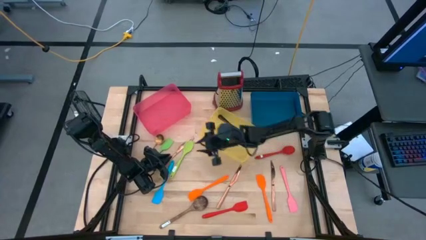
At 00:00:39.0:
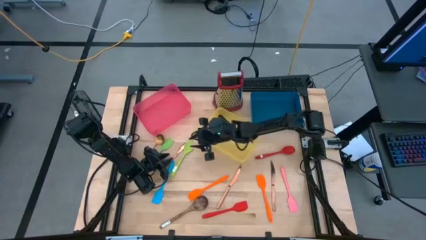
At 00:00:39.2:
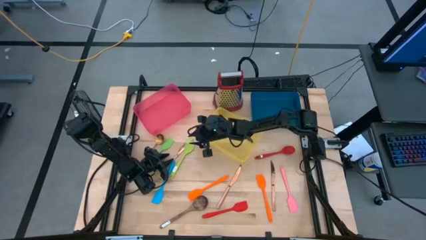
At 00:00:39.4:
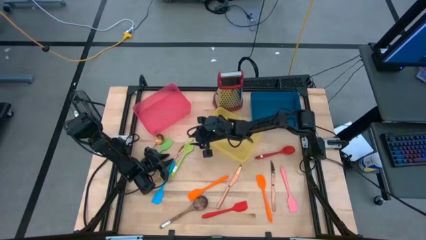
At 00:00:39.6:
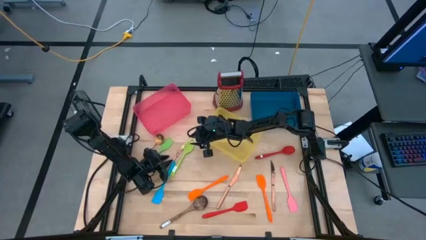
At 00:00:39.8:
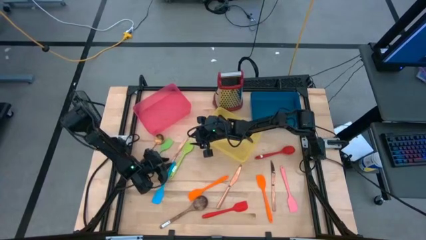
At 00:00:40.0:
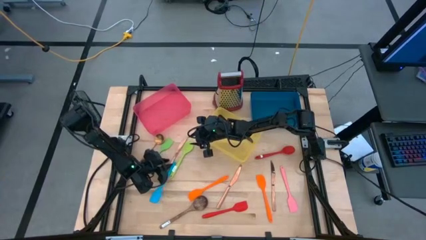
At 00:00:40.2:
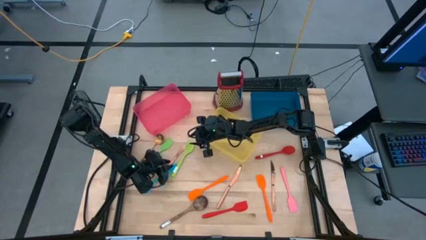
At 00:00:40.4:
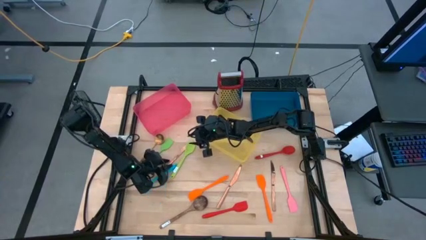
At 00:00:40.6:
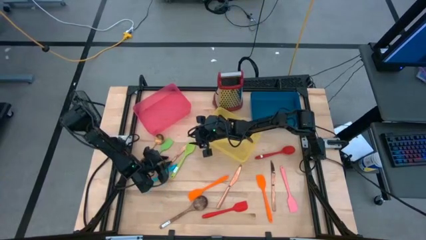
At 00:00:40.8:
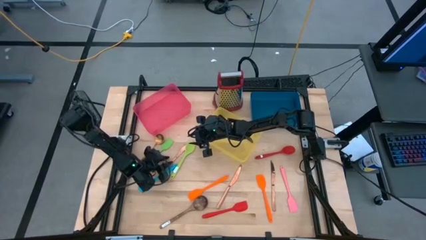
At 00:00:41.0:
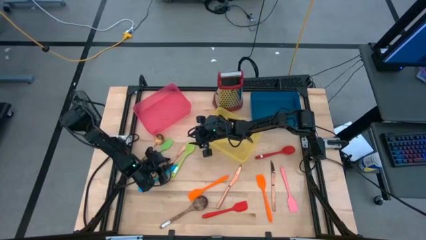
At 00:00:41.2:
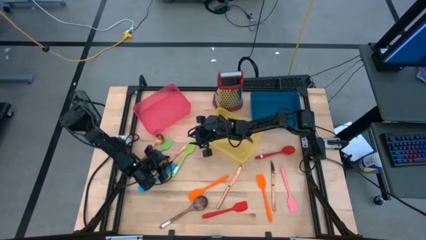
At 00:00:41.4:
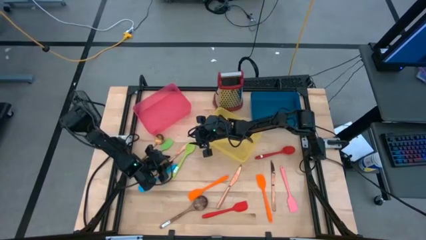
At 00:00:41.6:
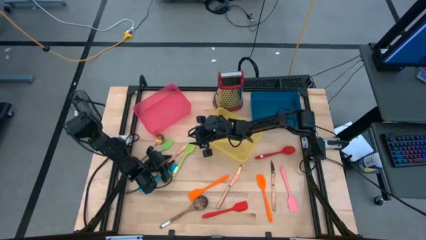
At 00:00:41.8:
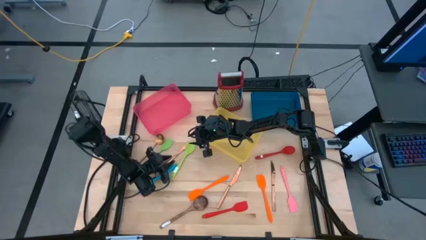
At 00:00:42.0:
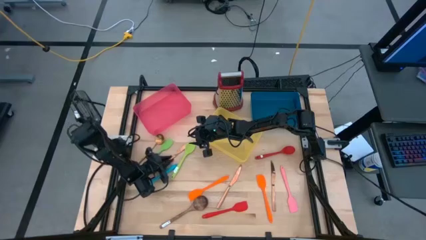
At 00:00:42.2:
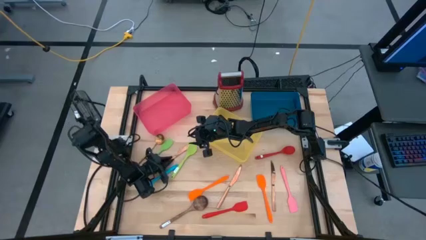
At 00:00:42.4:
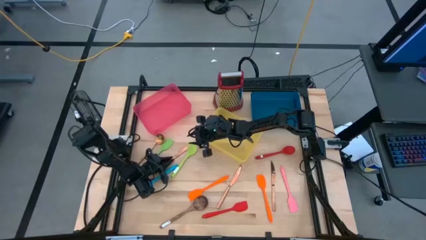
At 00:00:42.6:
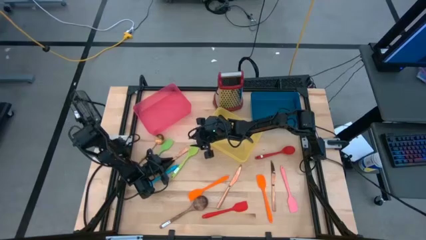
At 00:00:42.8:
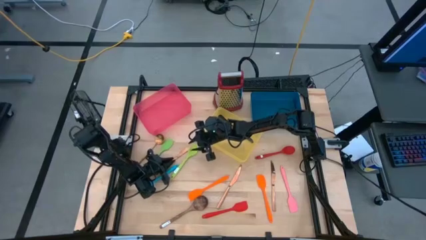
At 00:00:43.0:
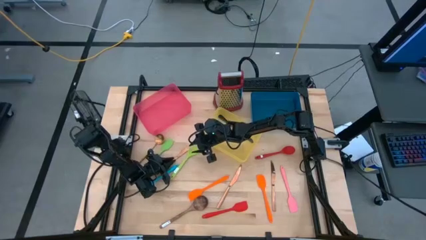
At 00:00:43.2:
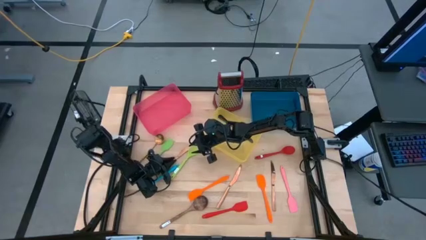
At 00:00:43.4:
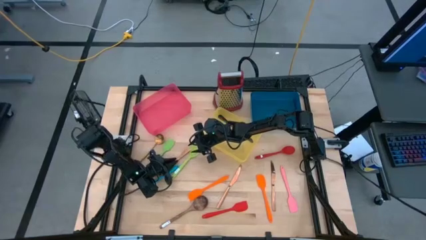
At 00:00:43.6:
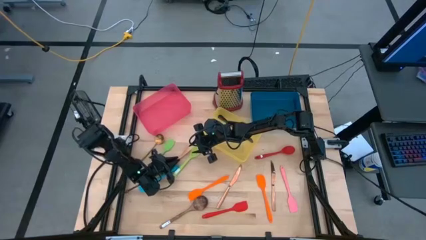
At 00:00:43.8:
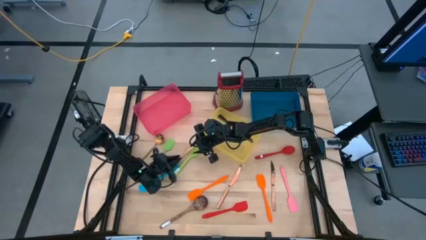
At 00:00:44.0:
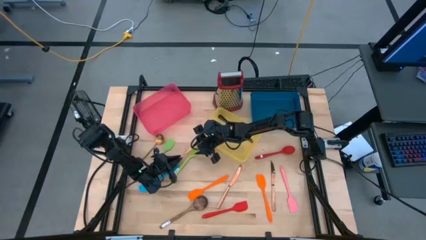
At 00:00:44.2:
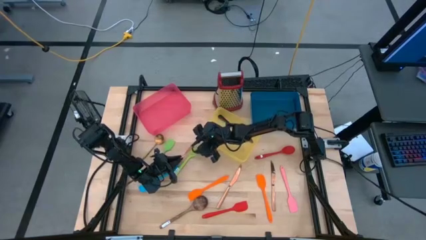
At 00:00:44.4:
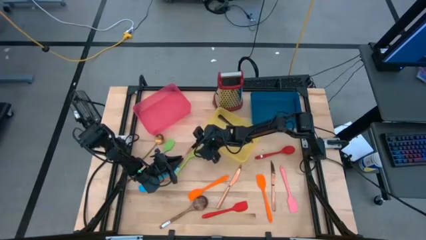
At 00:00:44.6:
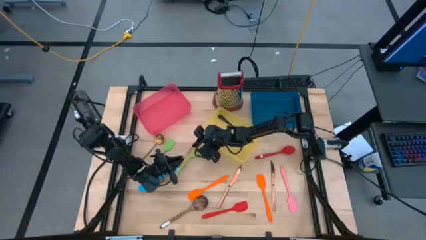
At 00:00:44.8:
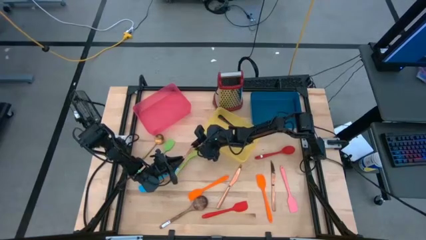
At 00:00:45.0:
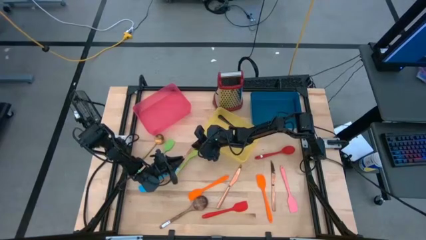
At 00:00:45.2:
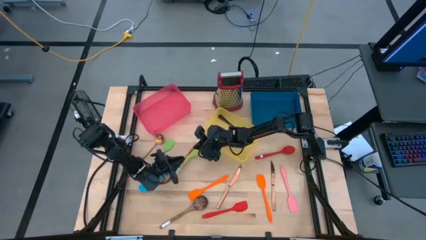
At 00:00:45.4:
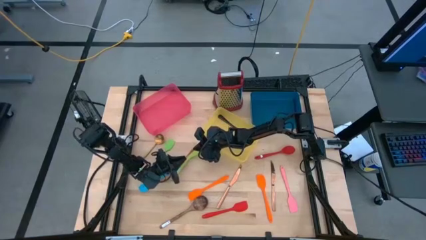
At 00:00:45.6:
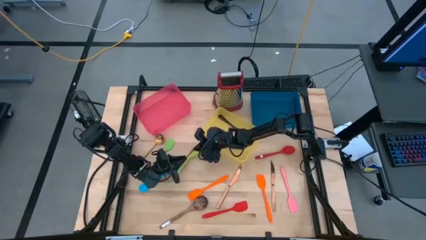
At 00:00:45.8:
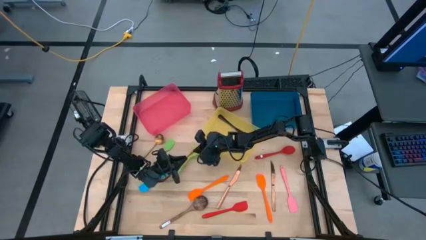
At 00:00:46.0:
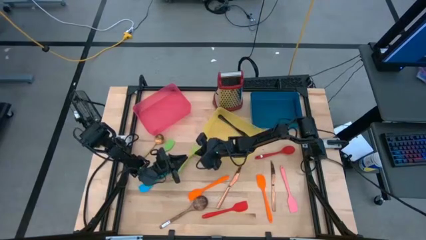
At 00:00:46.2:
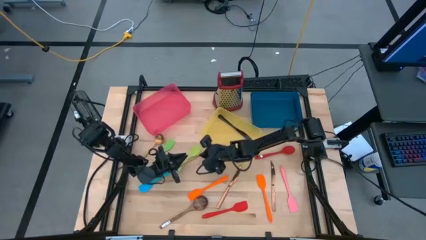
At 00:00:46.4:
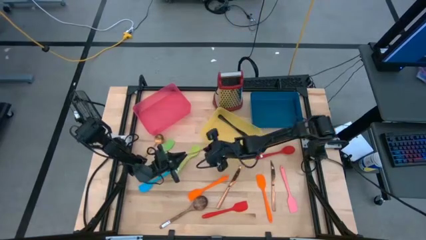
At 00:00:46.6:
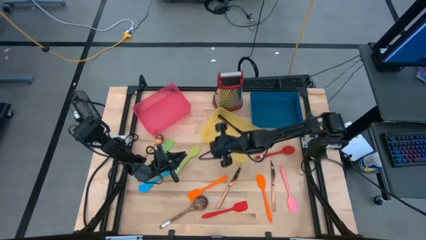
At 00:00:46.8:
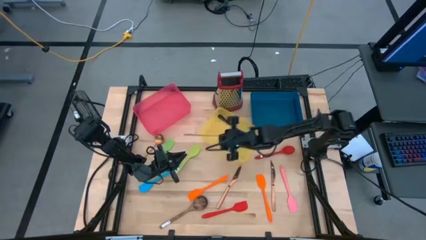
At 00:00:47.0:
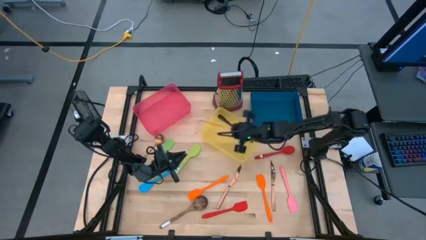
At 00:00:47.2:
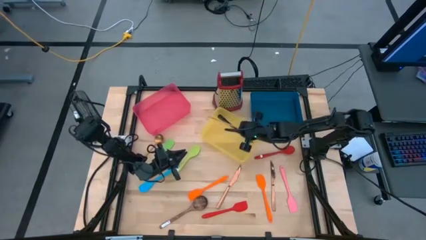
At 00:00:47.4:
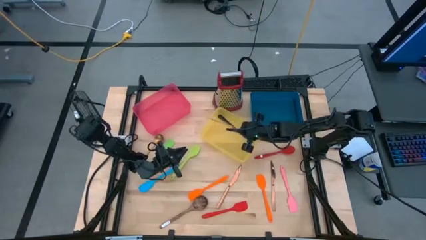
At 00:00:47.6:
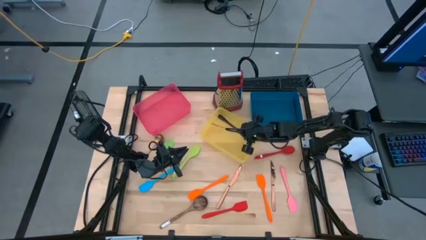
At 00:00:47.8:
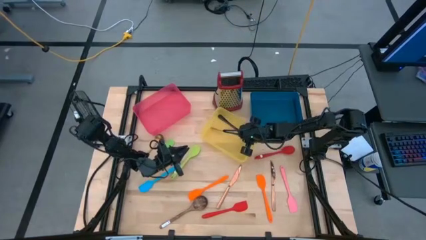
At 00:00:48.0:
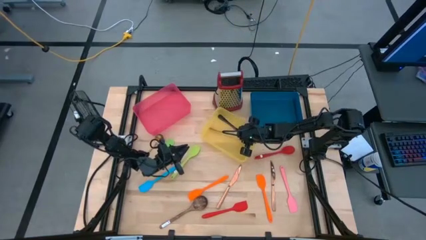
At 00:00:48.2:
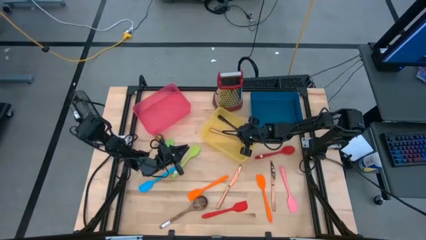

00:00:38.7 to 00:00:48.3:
Task: Pick & Place Kitchen Items
Put the brown table knife into the yellow bin

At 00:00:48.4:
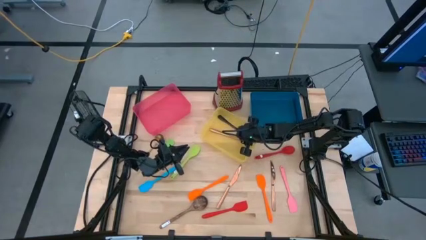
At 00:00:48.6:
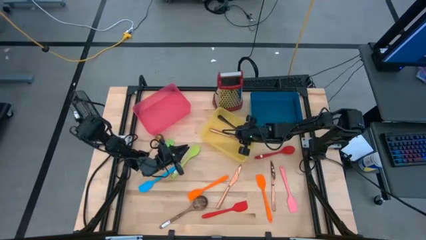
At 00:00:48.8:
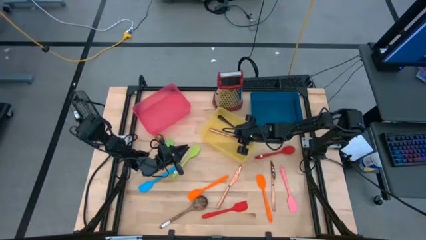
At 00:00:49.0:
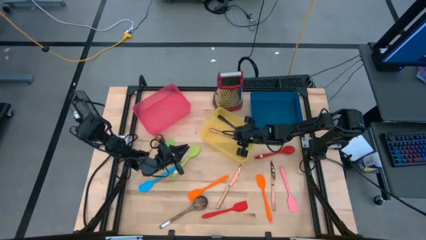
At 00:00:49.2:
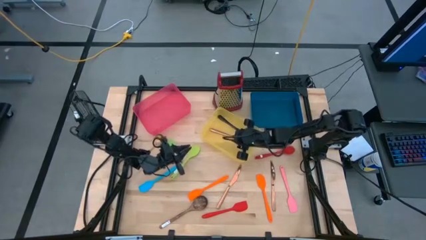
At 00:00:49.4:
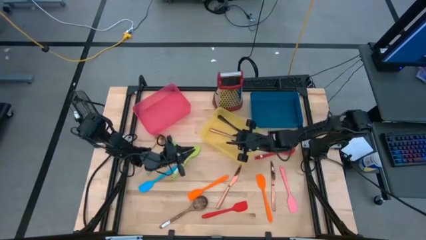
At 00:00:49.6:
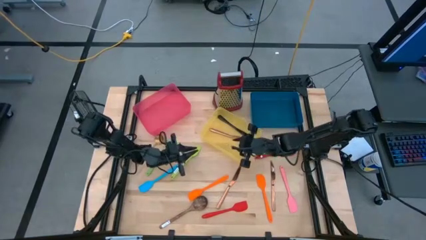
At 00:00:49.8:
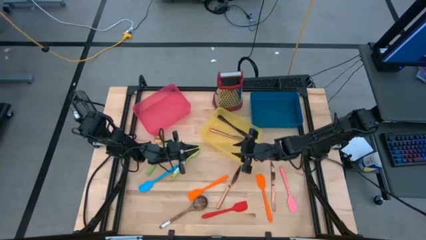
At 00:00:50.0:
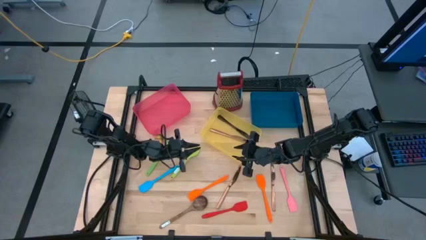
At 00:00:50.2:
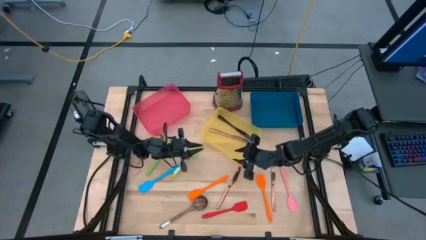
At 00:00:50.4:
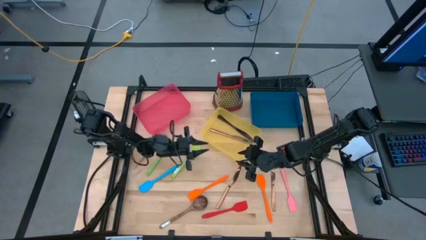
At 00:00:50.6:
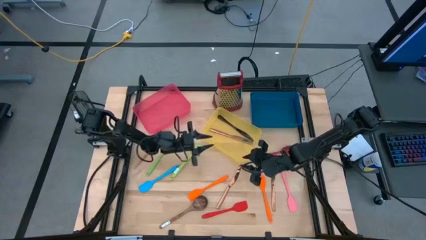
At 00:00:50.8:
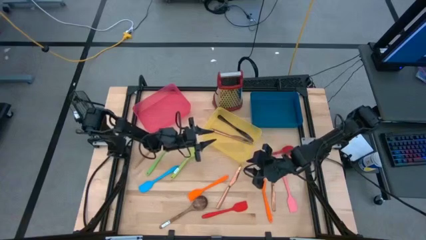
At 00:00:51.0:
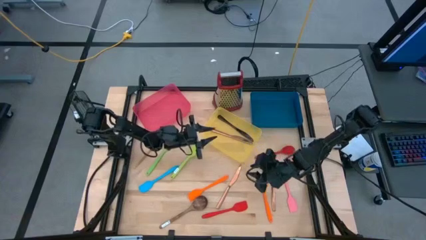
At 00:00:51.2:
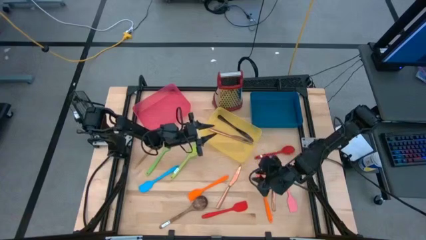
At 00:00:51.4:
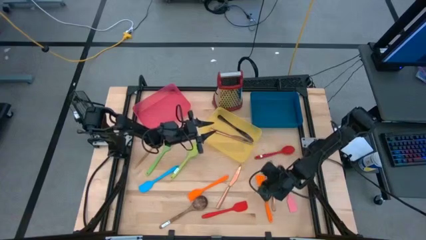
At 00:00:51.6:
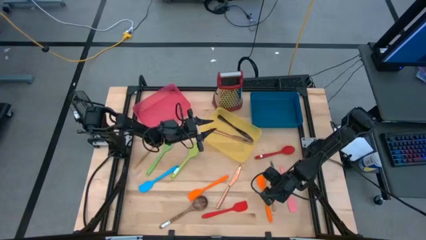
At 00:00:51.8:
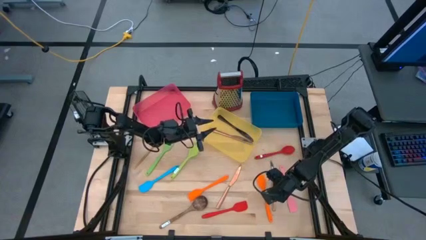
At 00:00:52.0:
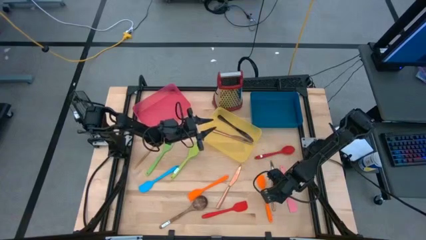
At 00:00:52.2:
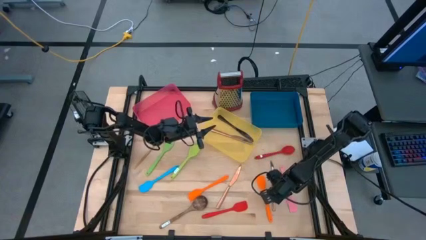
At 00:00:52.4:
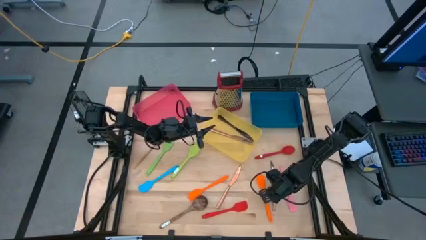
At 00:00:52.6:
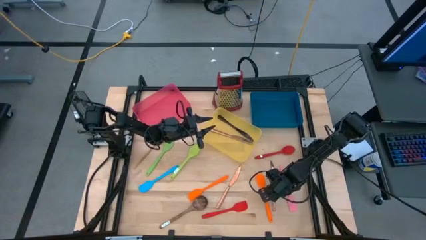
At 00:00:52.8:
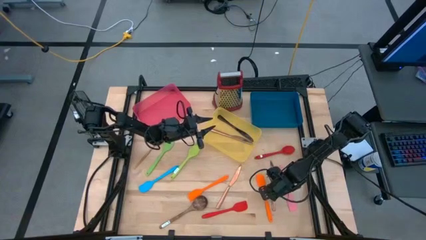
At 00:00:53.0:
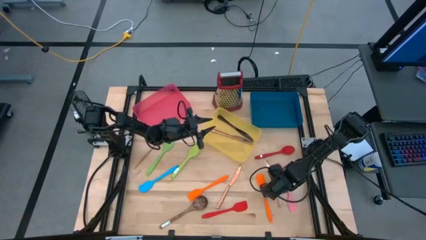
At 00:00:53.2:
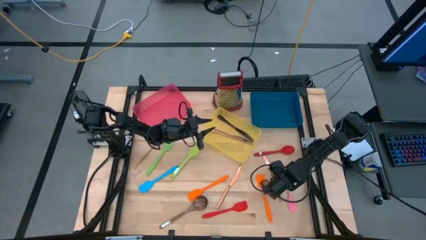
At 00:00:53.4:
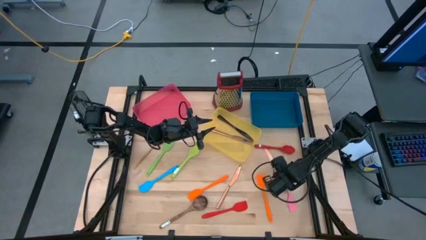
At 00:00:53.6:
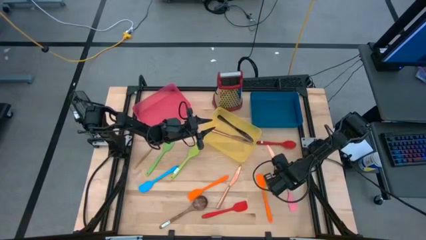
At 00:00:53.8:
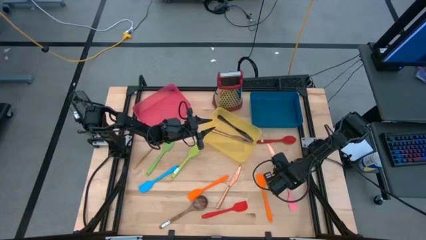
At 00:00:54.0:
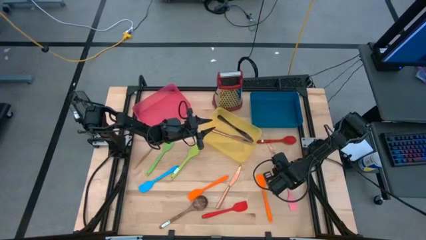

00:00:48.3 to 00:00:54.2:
Put the brown table knife into the yellow bin
